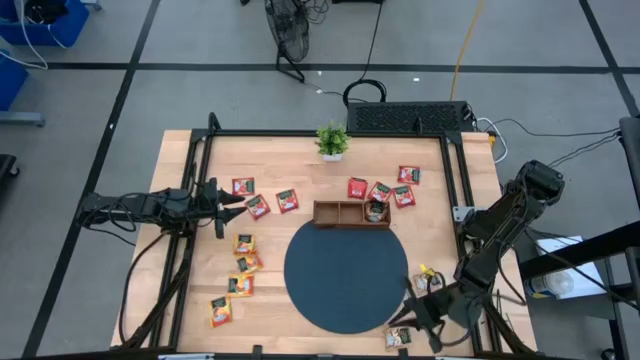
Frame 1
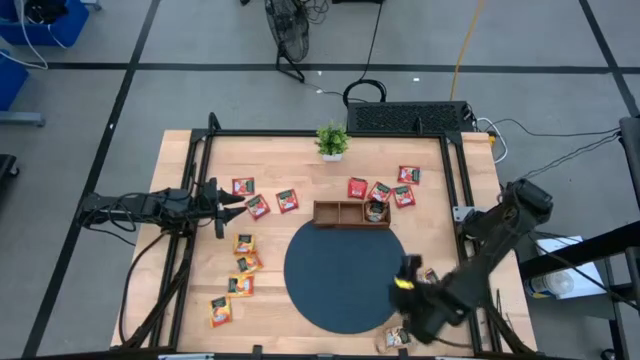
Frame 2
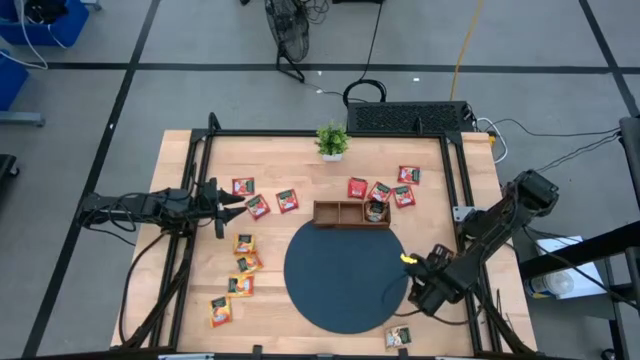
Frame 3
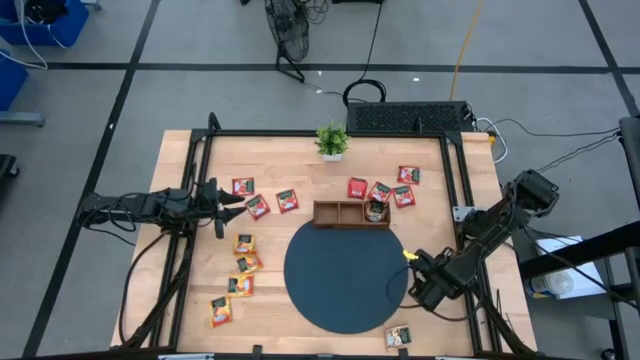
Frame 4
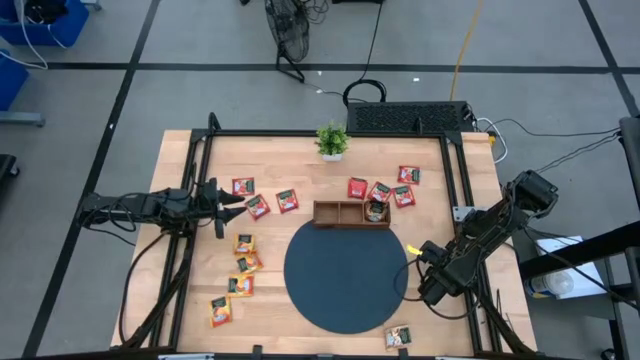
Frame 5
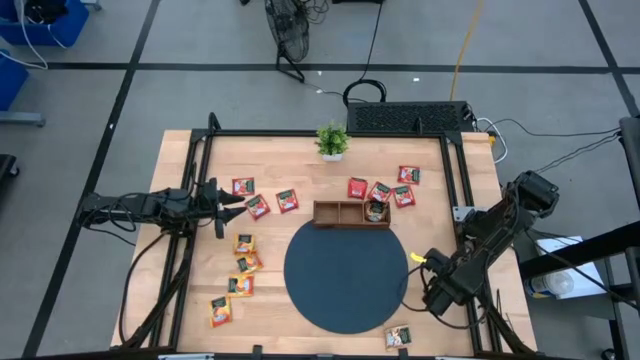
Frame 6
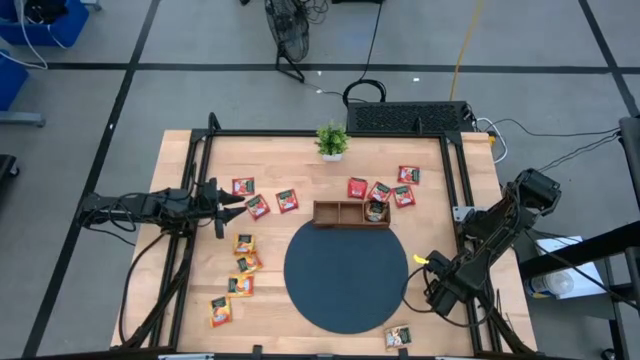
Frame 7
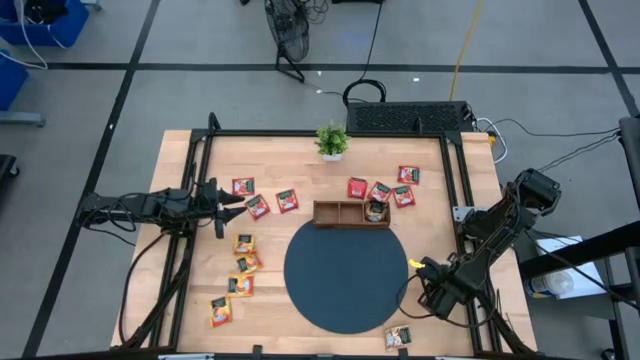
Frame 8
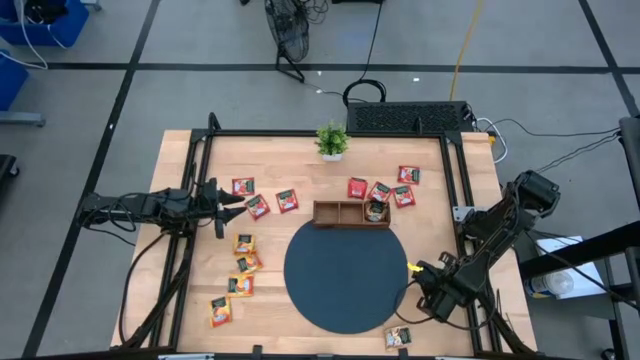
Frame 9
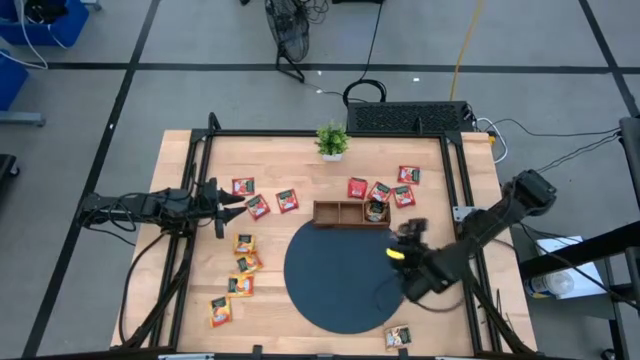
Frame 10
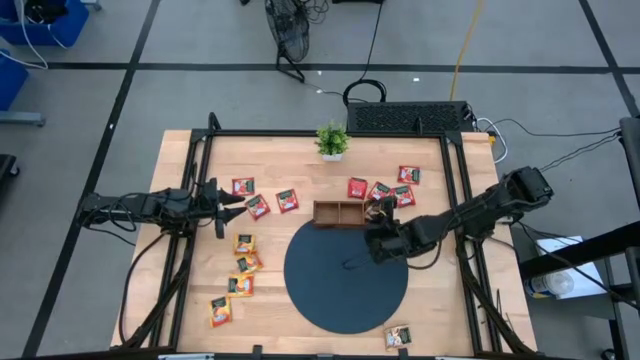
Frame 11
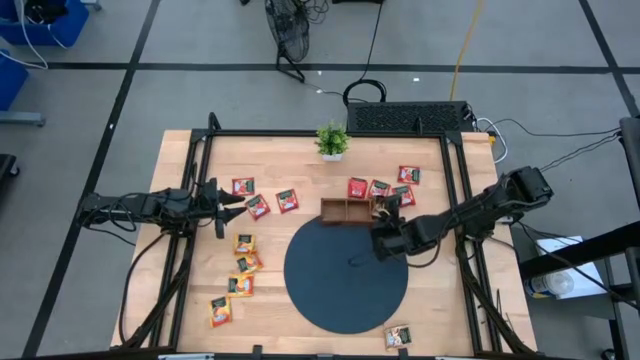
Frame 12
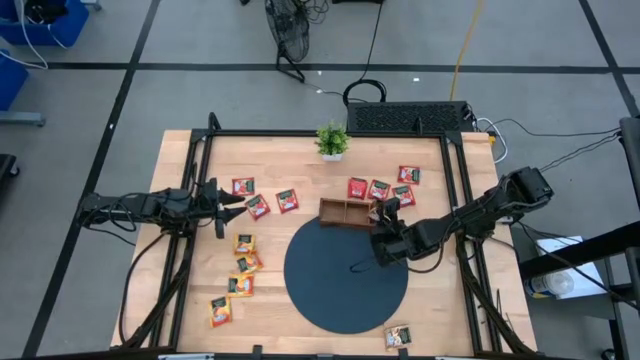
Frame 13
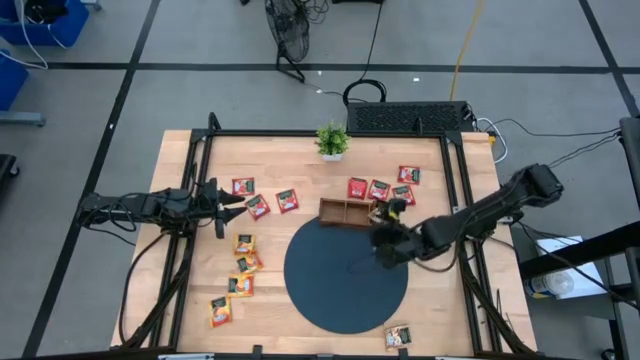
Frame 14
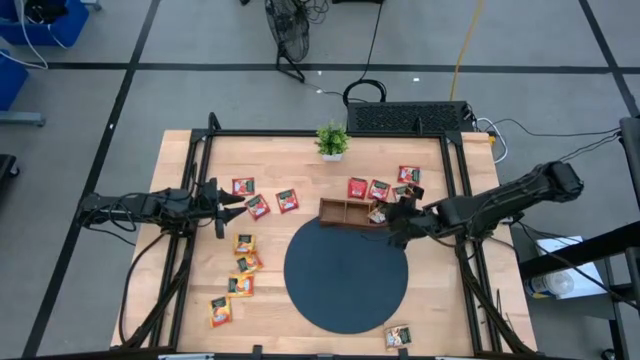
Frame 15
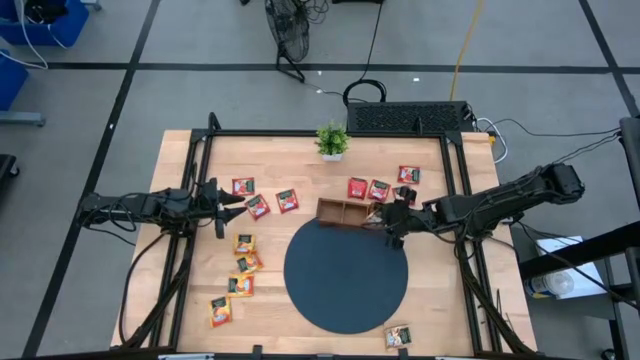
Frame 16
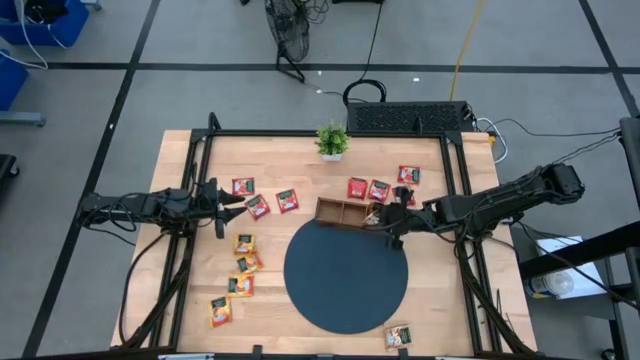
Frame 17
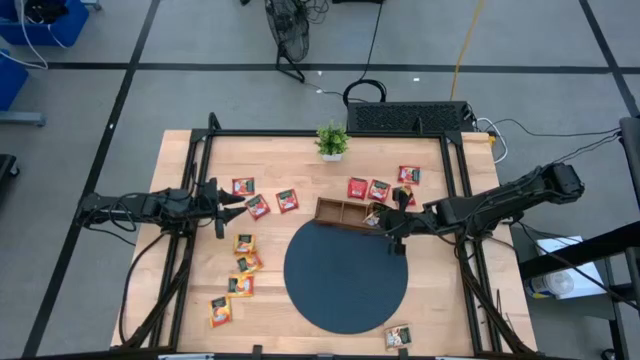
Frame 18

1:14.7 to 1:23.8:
Task: Pick & Place Tea
Put the top brown tea bag into the right slot of the wooden organizer

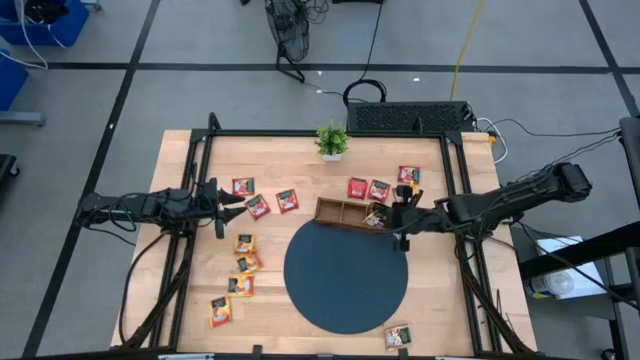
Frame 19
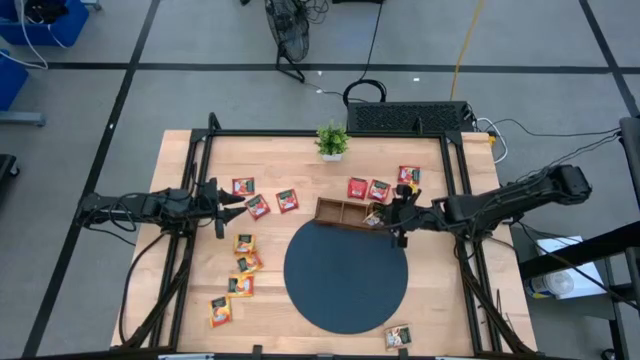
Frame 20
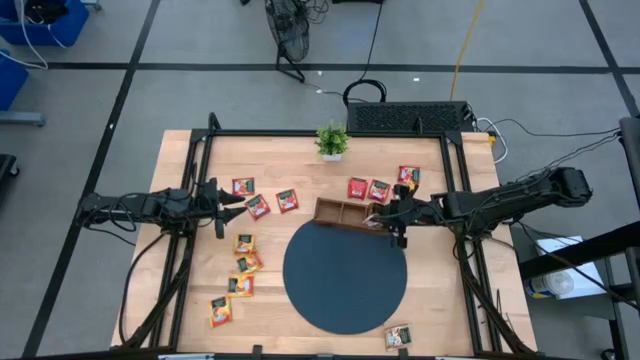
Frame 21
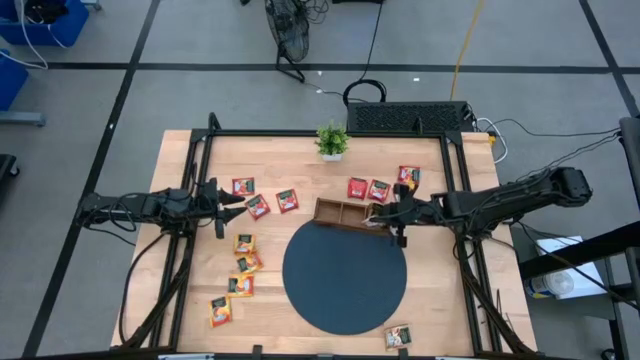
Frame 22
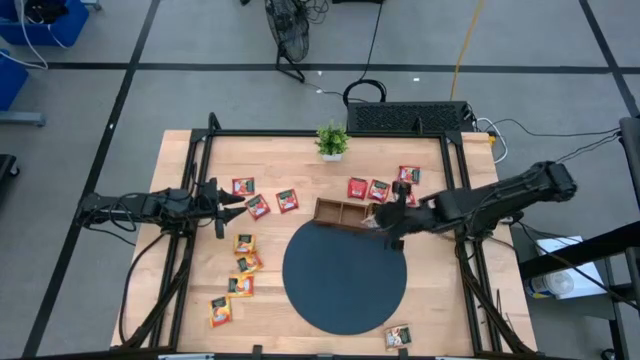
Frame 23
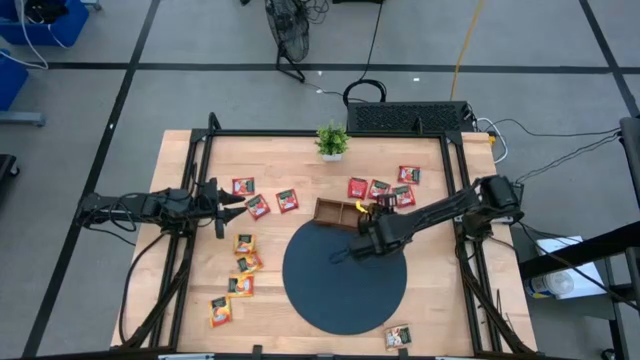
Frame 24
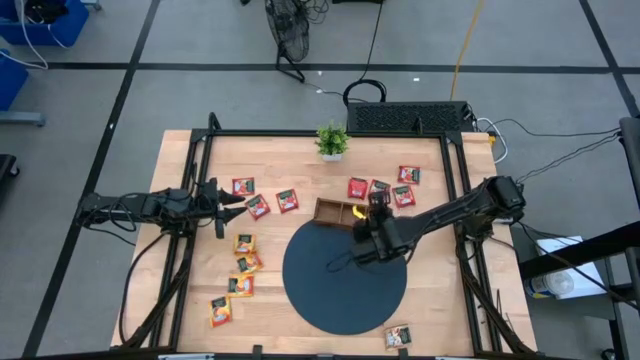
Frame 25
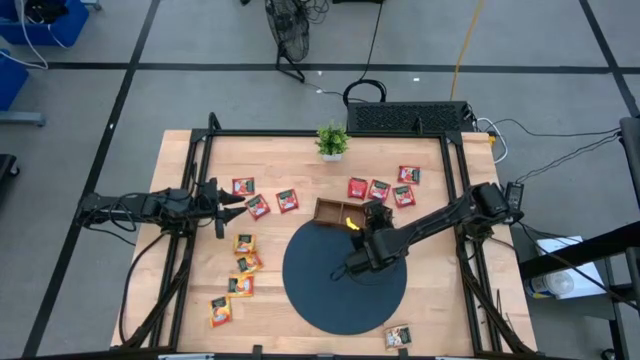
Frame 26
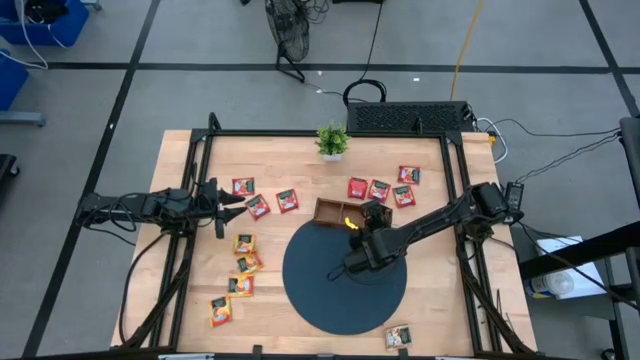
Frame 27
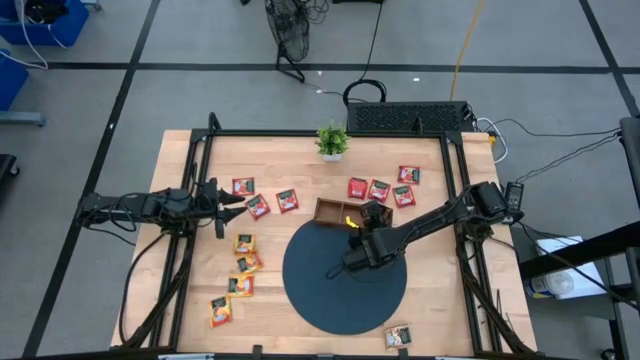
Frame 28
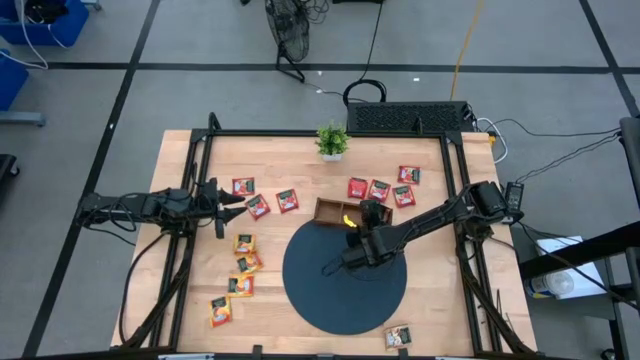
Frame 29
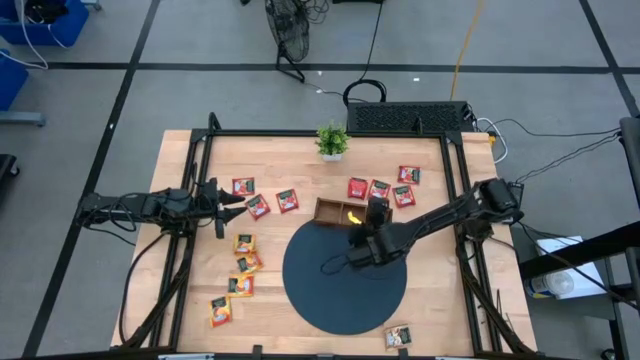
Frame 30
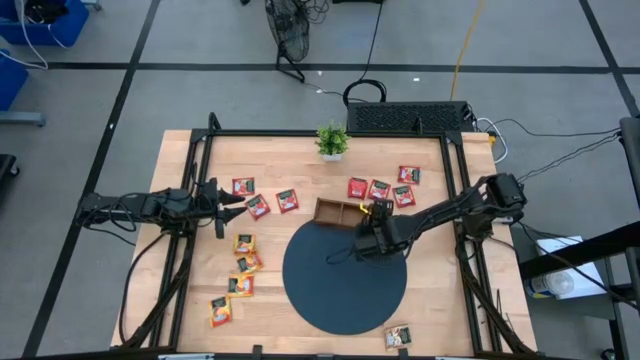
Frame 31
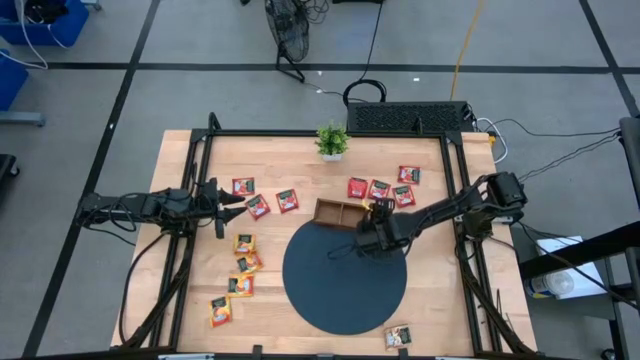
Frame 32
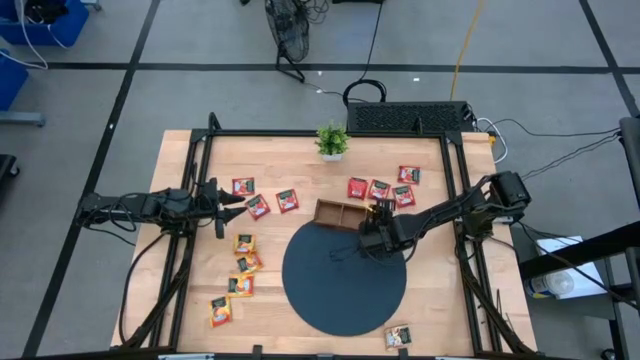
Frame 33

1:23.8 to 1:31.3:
Put the top brown tea bag into the right slot of the wooden organizer

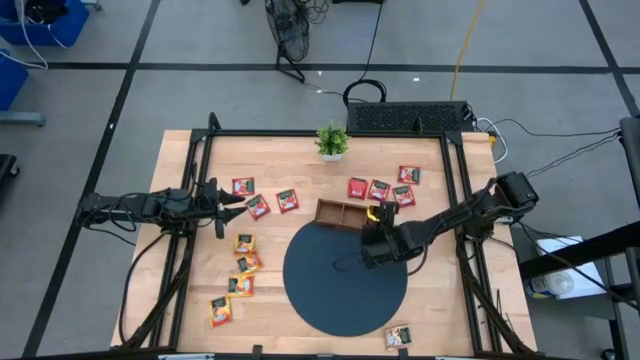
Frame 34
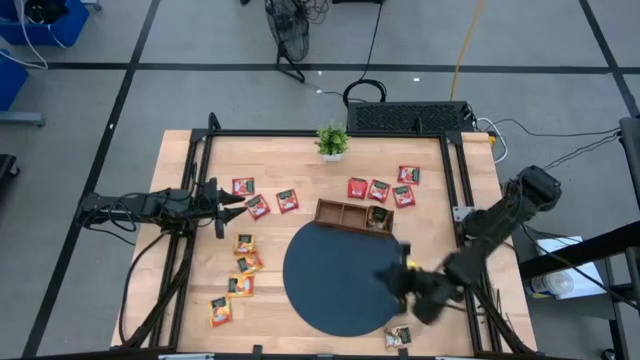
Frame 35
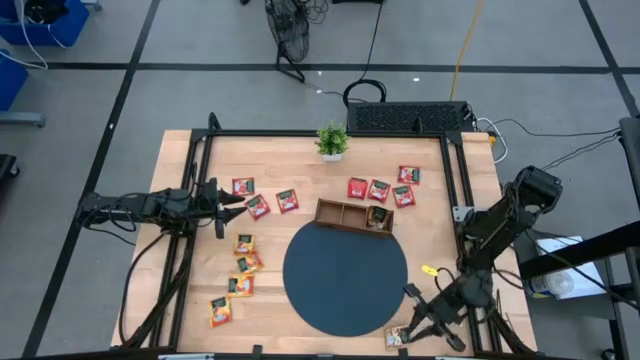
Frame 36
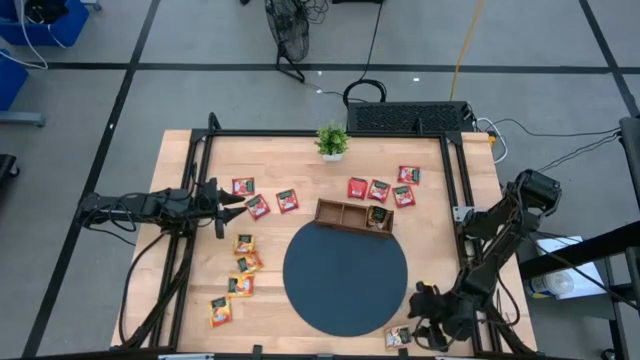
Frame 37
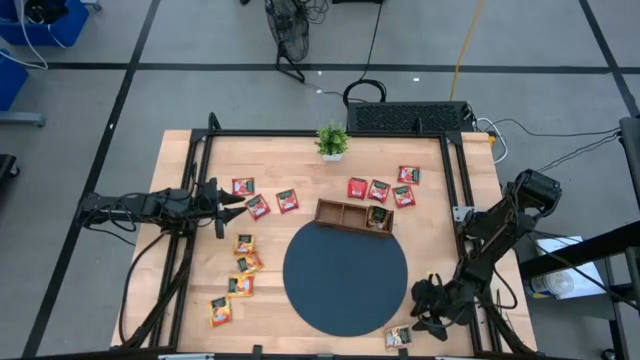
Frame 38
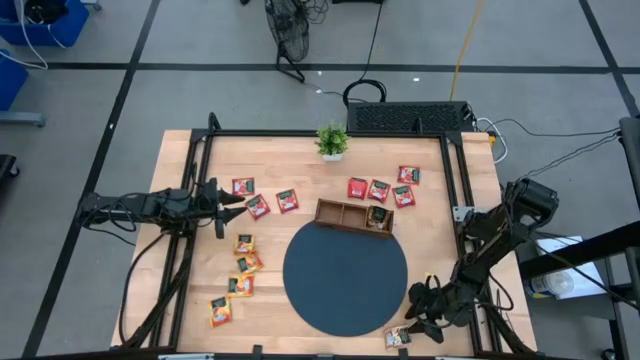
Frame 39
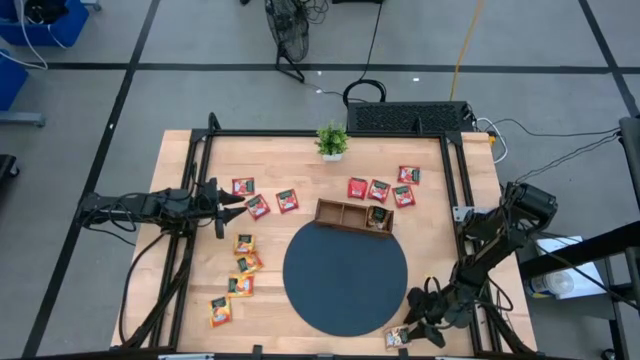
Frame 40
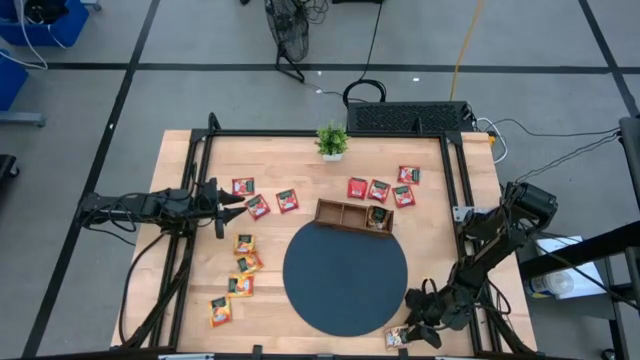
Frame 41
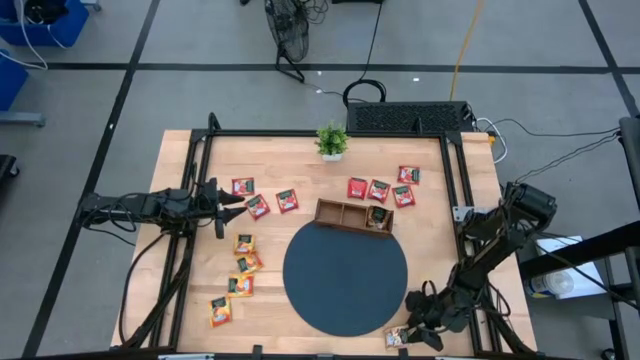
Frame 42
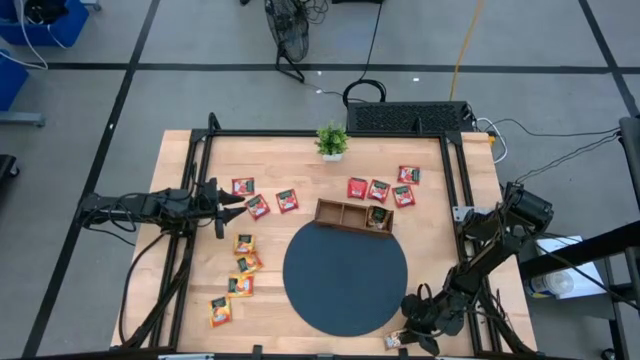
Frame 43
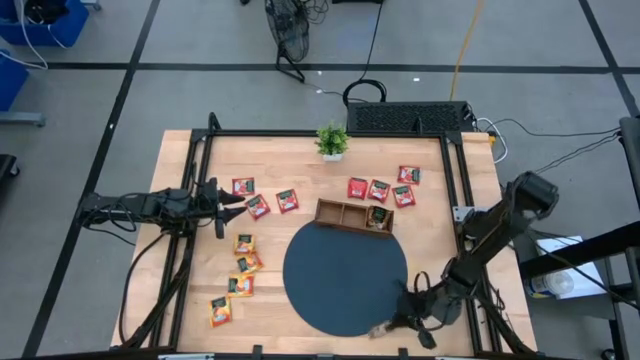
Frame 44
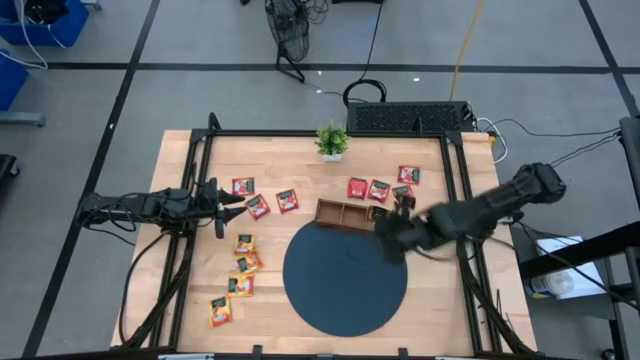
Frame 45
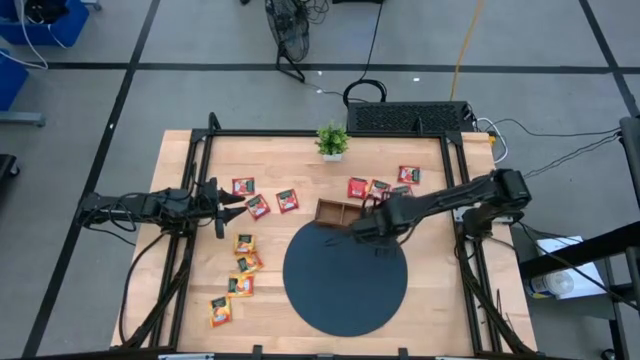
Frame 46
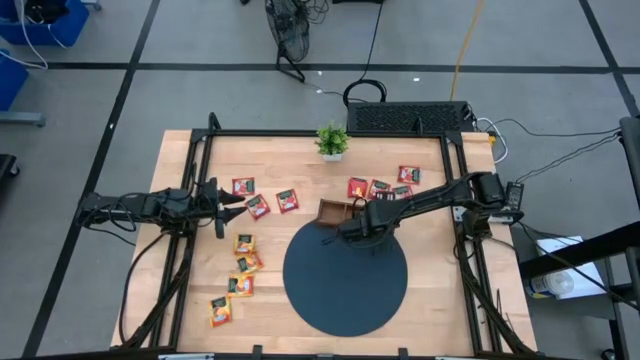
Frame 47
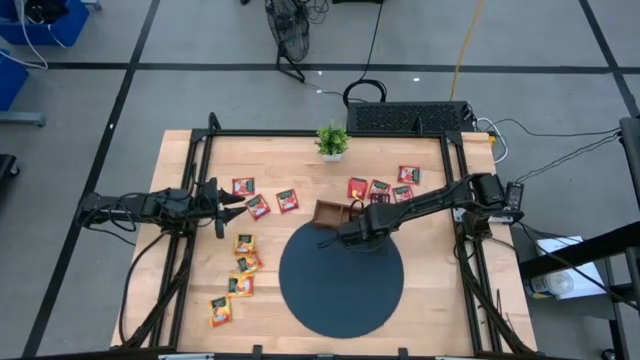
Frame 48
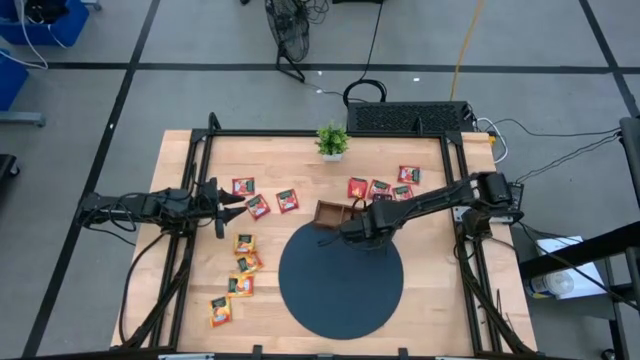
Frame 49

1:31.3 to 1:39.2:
Put the brown tea bag into the right slot of the wooden organizer
